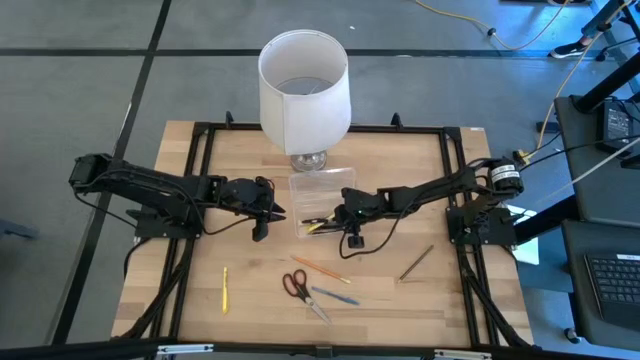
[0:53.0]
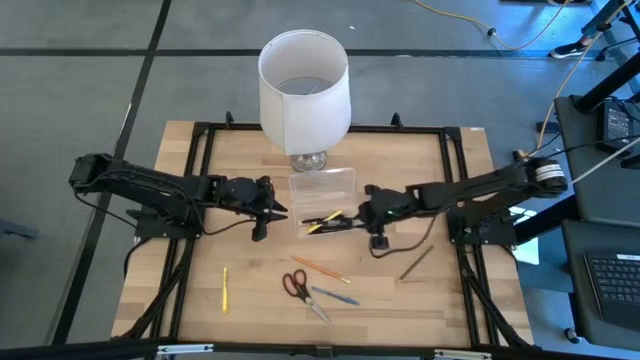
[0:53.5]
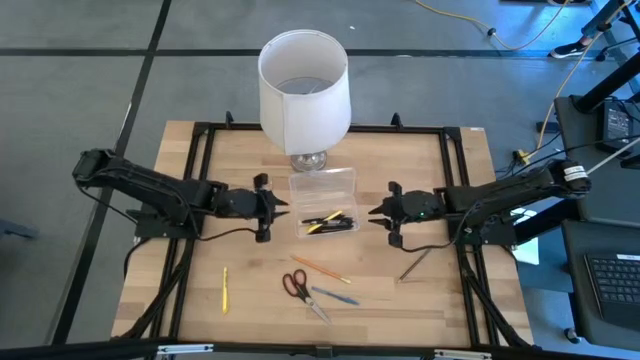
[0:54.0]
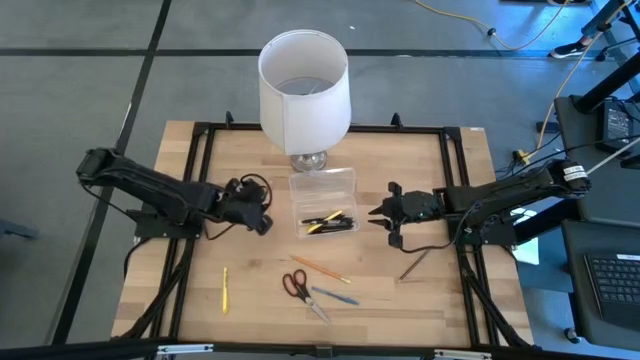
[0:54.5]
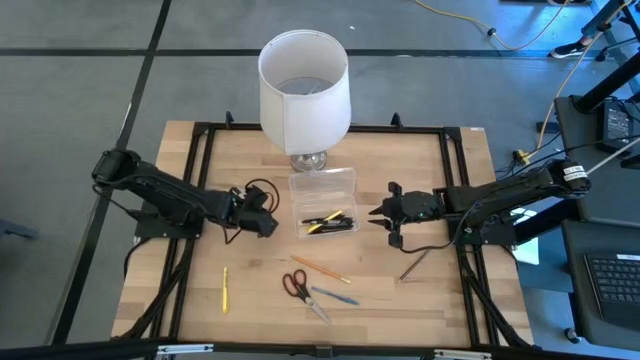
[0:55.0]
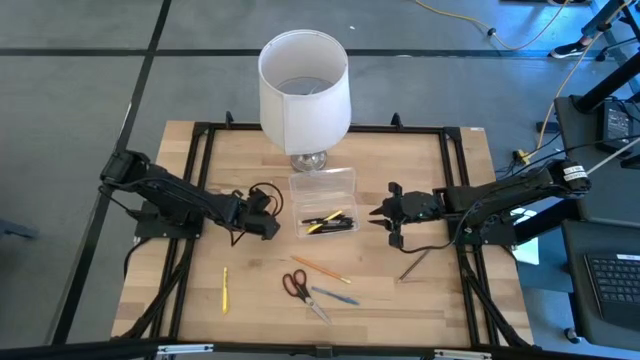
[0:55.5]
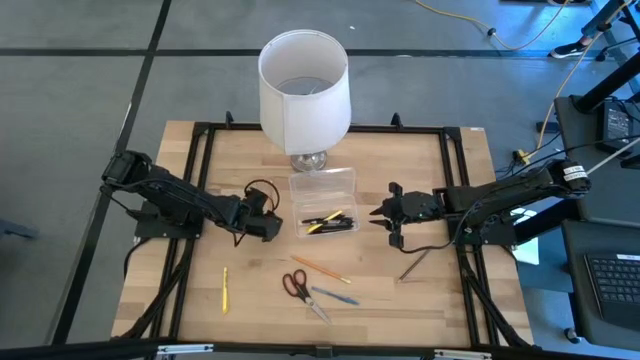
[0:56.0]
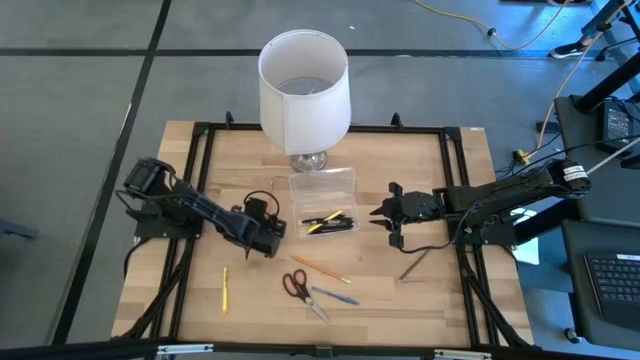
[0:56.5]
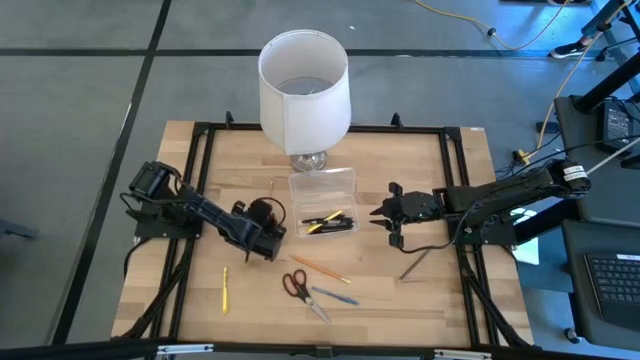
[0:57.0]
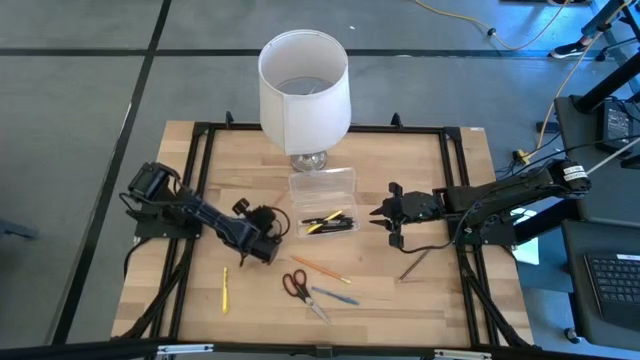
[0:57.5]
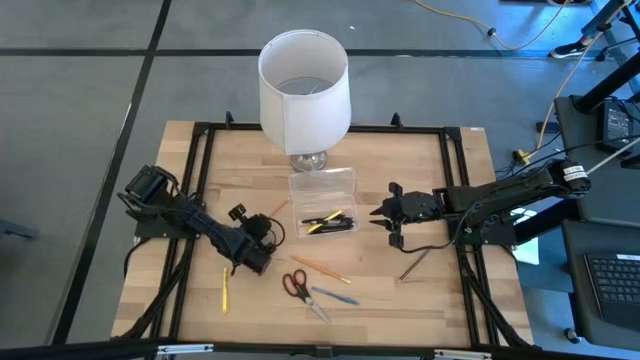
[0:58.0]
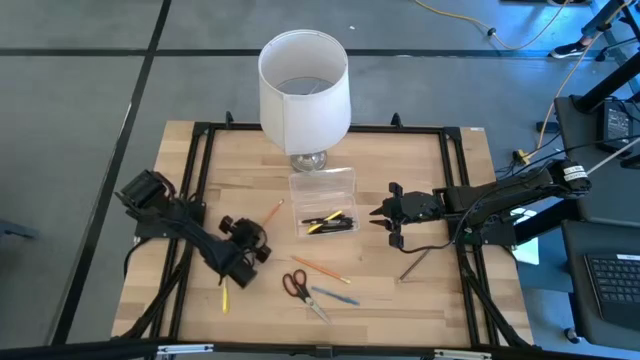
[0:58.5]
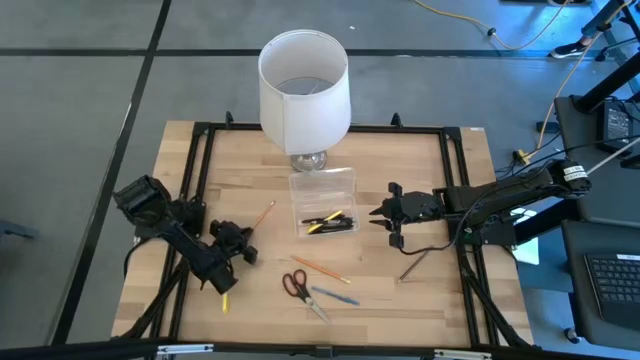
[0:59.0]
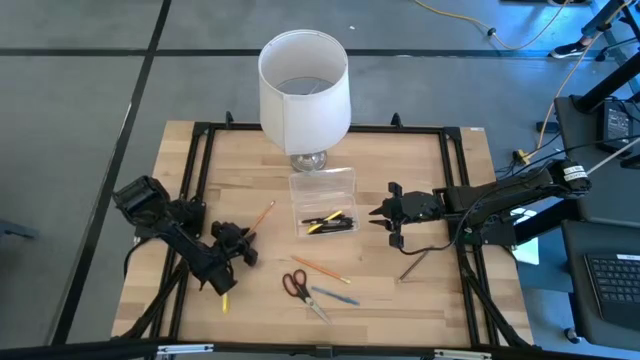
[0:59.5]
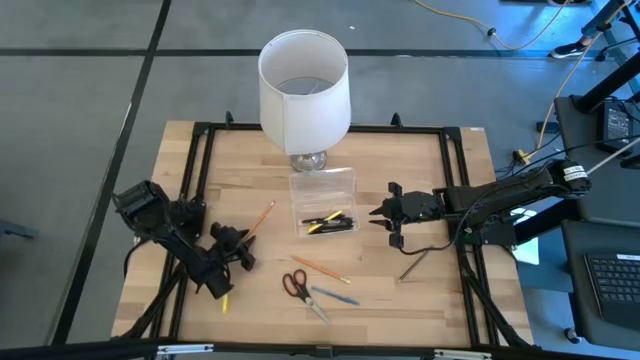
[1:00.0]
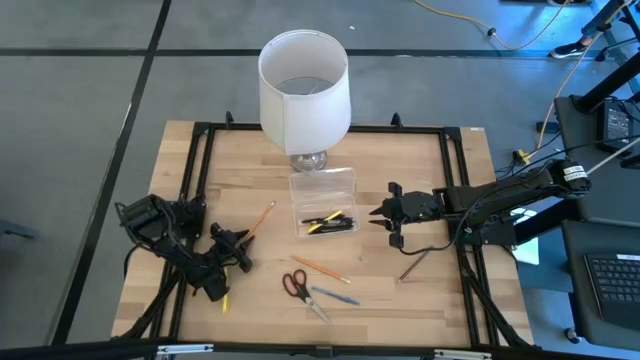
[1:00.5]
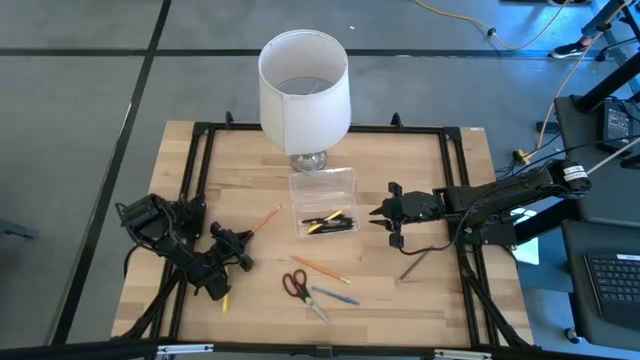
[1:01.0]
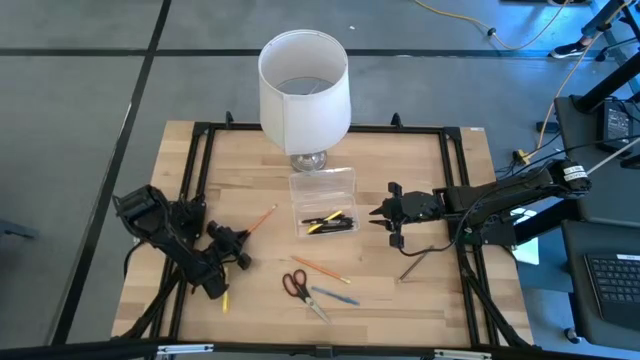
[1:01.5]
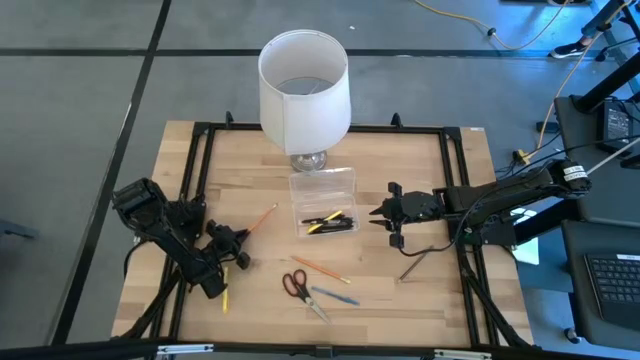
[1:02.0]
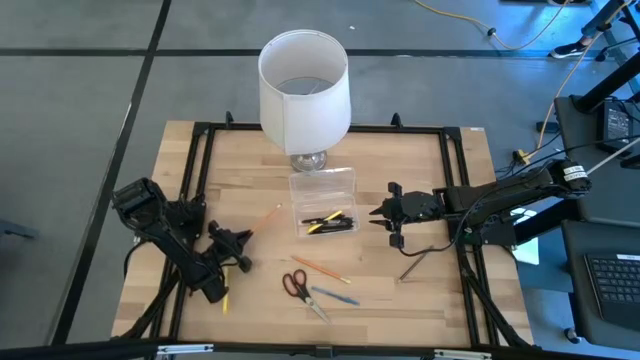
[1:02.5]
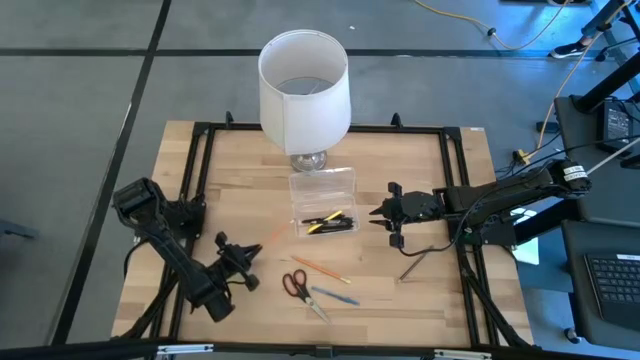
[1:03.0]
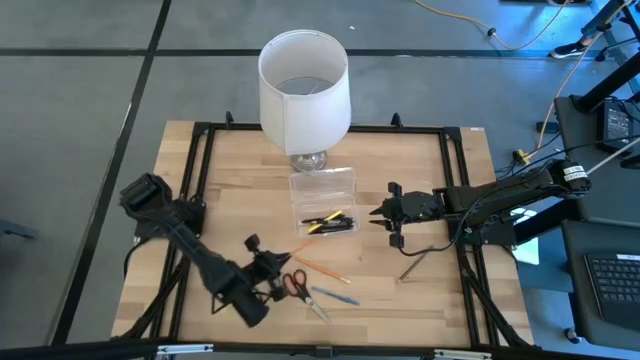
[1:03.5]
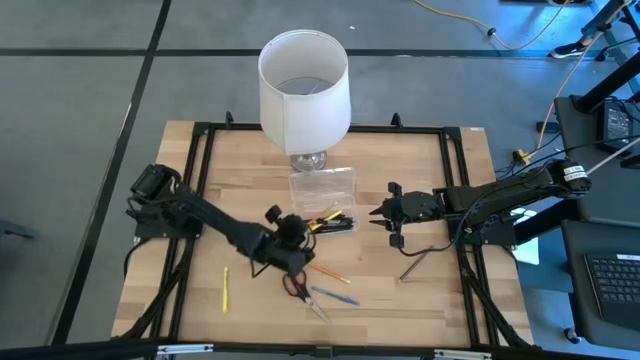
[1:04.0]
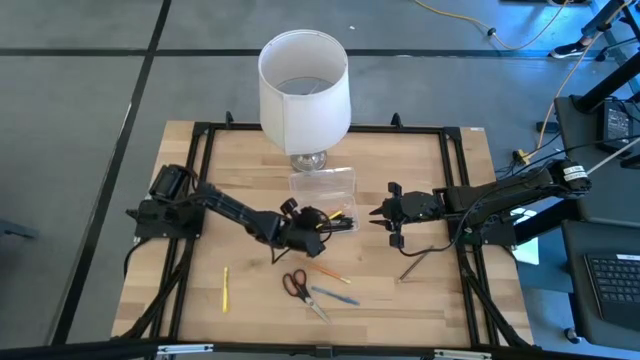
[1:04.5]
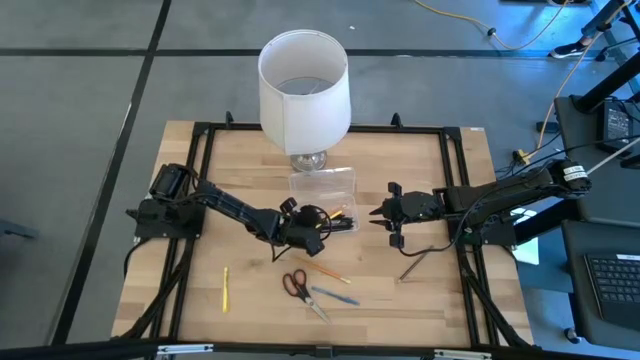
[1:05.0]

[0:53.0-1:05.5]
Task: Pick & place school supplies into a supply box
Put the orange pencil into the transparent supply box

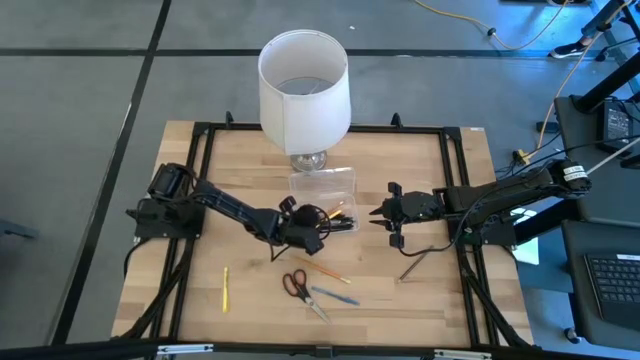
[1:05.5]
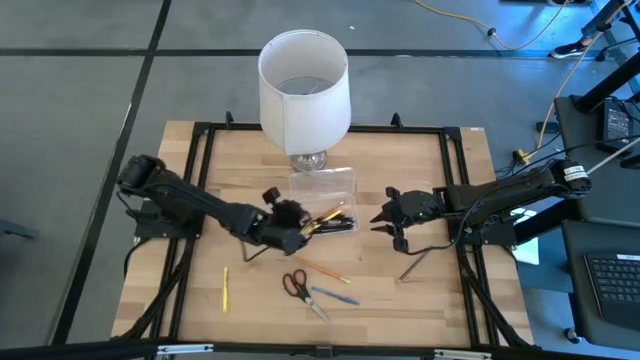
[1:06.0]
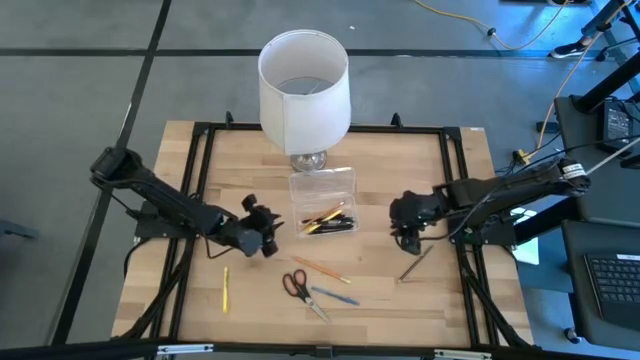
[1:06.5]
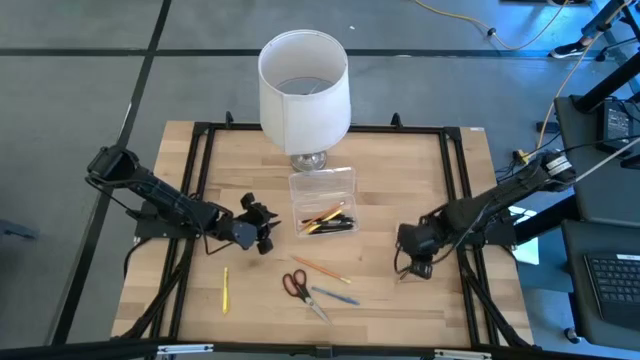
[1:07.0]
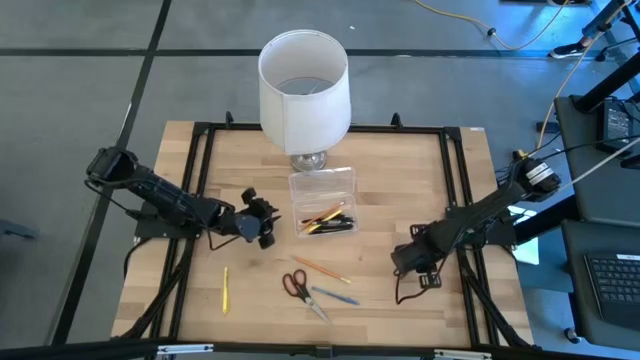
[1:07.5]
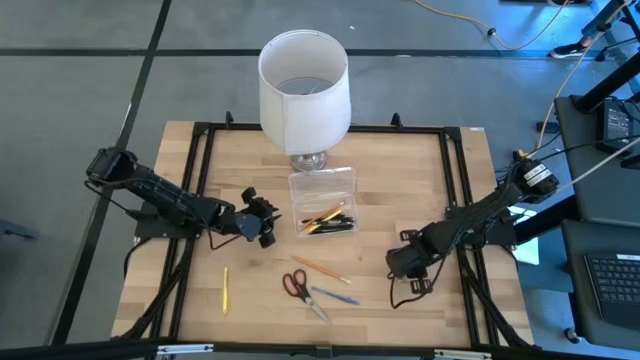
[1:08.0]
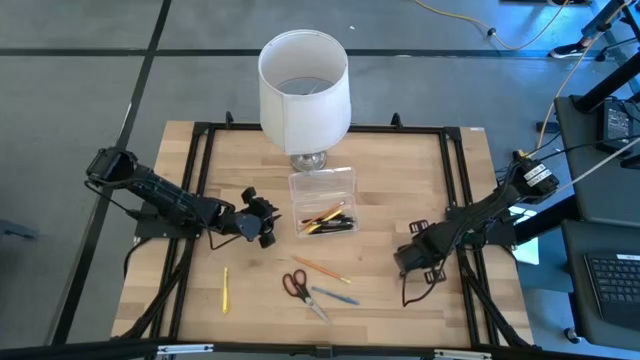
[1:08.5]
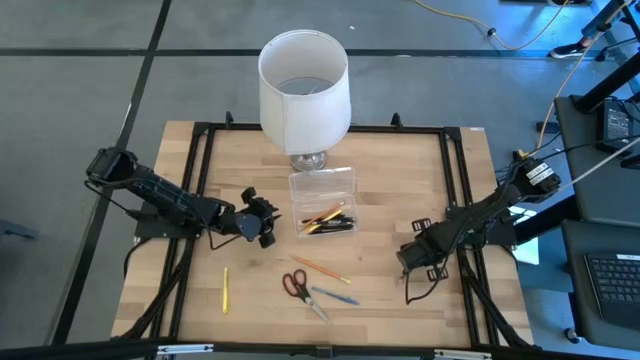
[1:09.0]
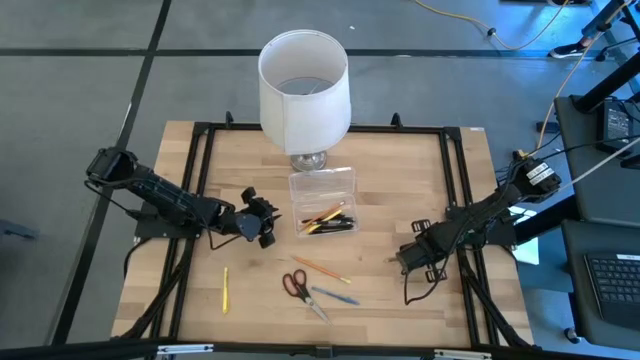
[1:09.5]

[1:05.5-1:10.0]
Put the black pencil into the transparent supply box

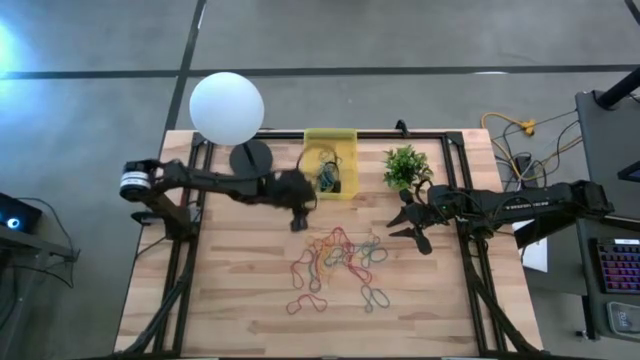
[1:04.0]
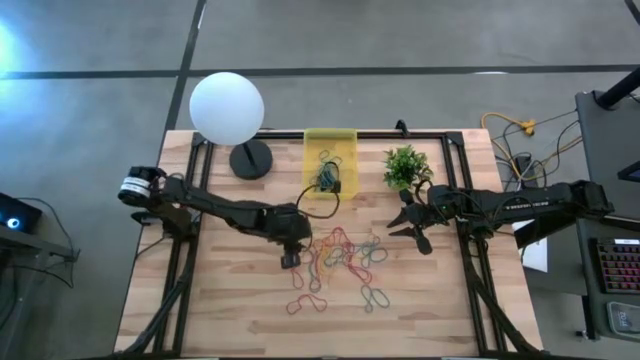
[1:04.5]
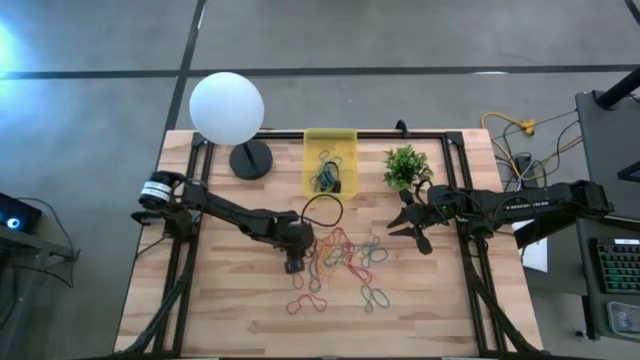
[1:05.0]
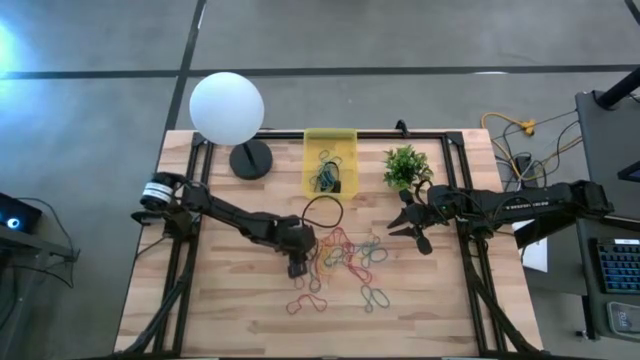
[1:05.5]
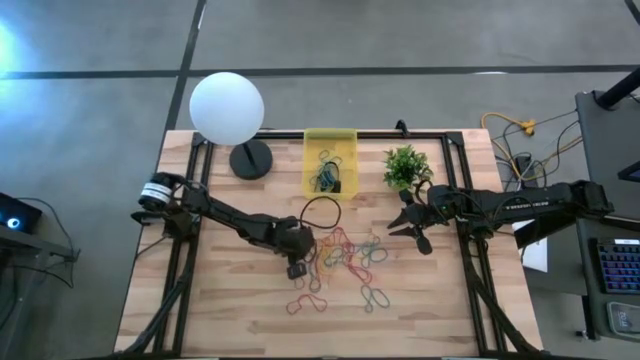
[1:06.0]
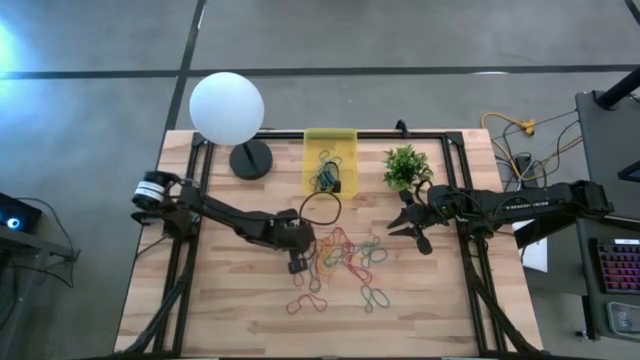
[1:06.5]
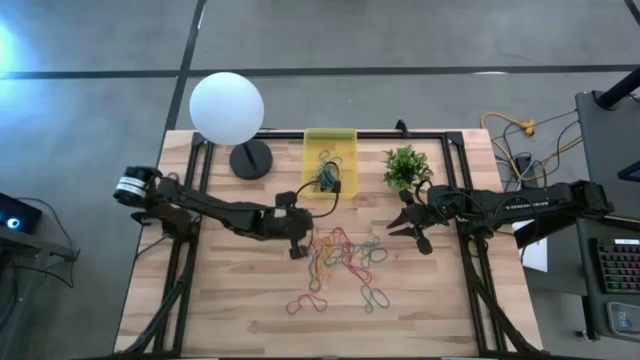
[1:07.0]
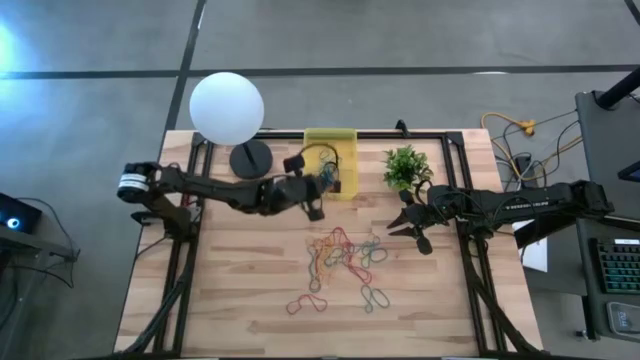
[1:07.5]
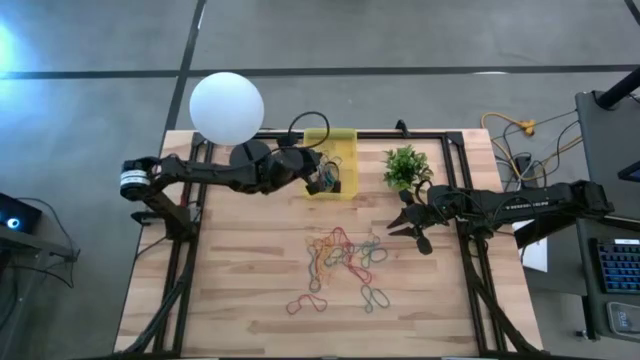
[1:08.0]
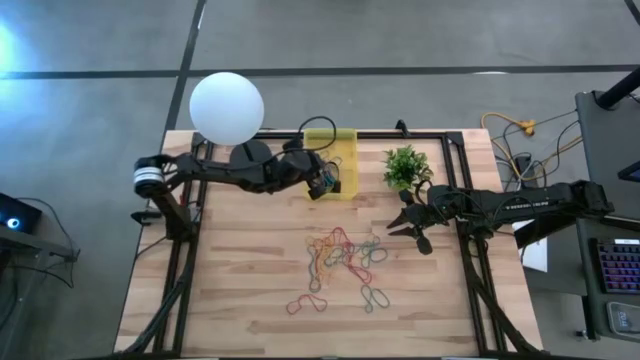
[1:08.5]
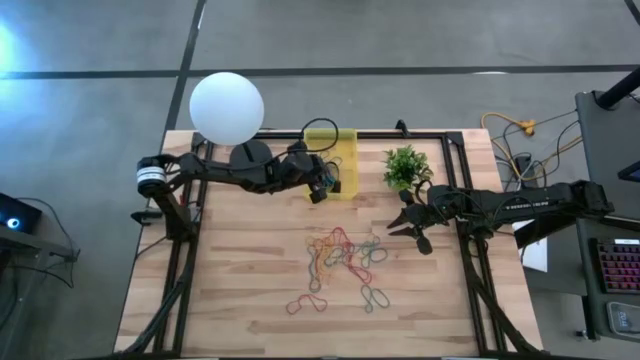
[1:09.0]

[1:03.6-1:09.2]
Task: Pick and place rubber bands into bin
Put the red rubber band into the yellow bin
